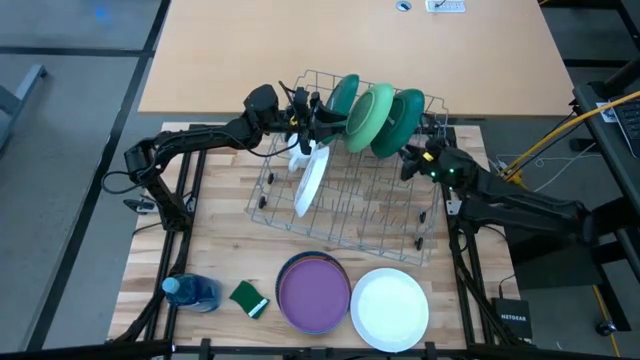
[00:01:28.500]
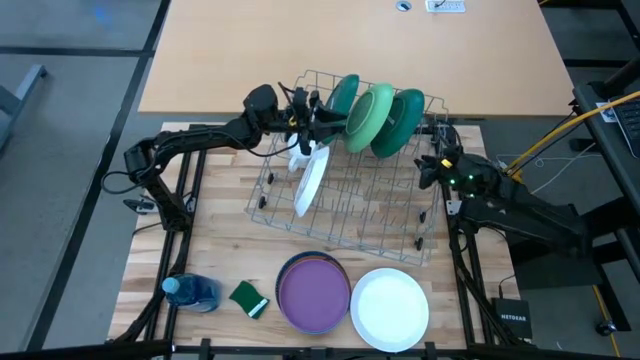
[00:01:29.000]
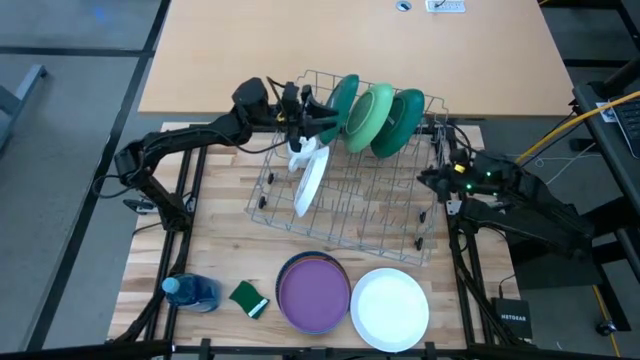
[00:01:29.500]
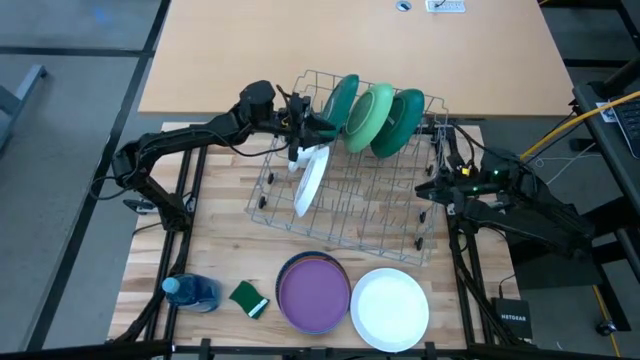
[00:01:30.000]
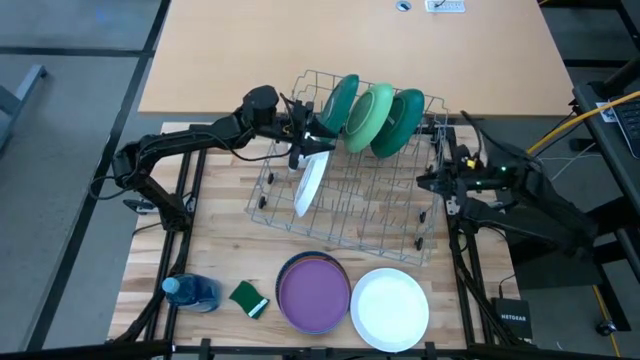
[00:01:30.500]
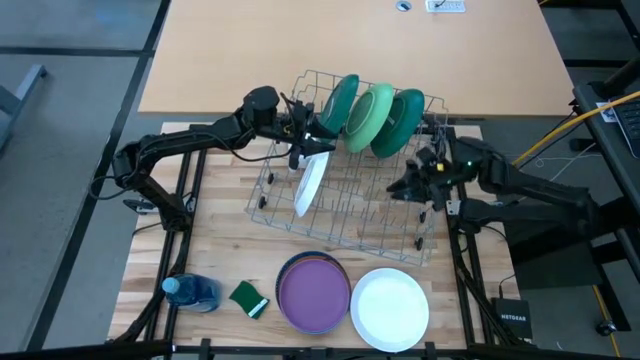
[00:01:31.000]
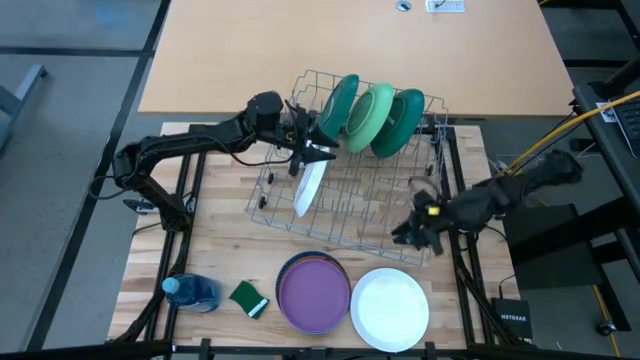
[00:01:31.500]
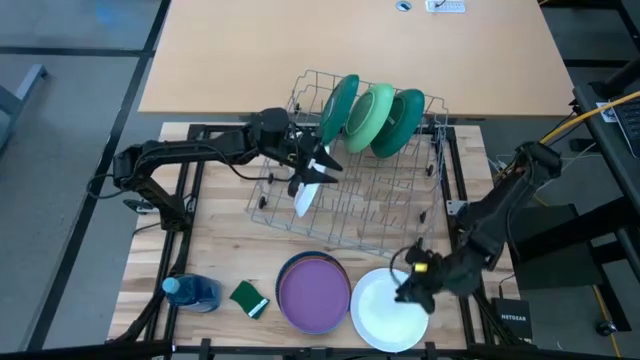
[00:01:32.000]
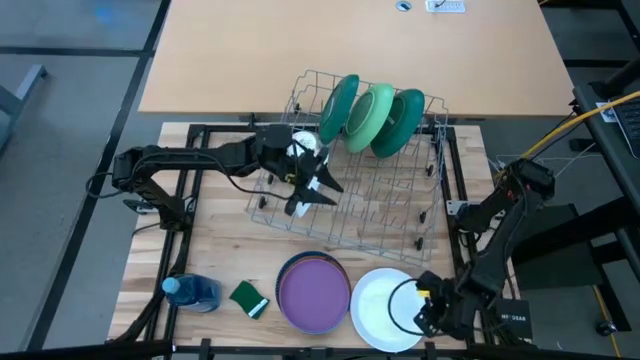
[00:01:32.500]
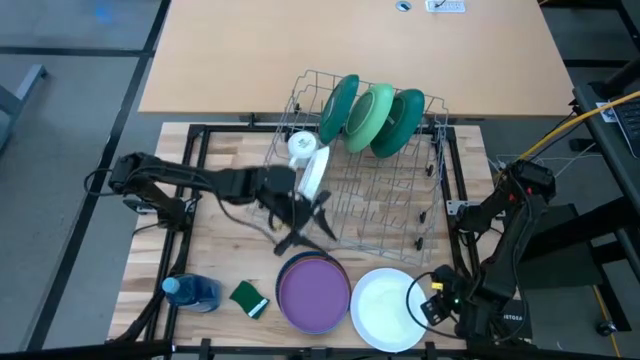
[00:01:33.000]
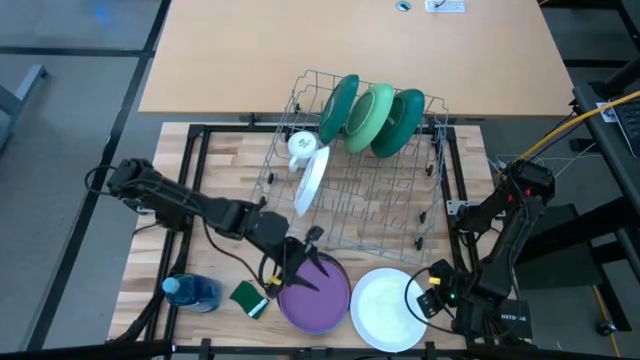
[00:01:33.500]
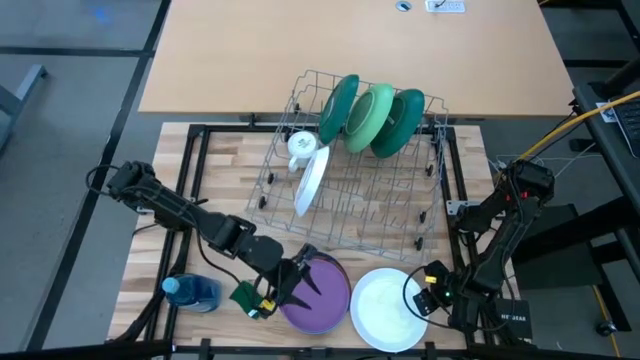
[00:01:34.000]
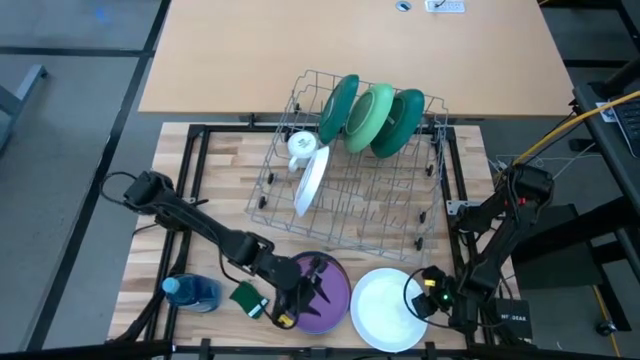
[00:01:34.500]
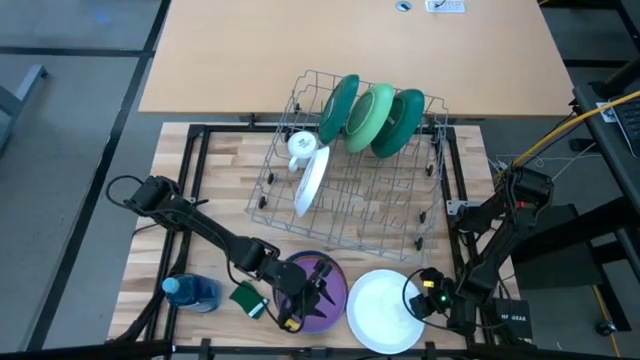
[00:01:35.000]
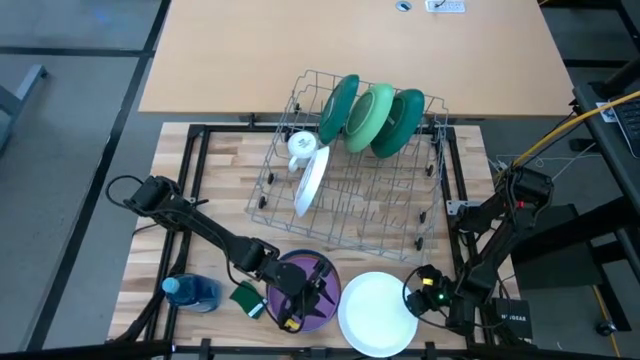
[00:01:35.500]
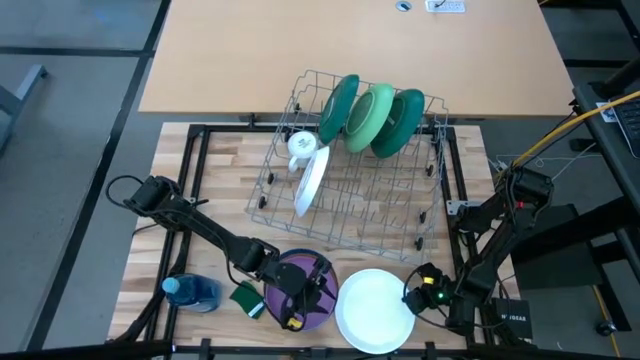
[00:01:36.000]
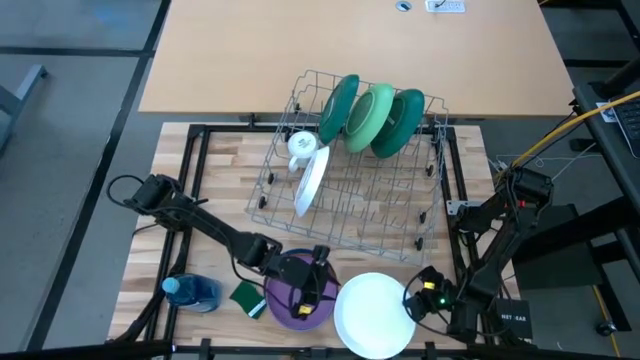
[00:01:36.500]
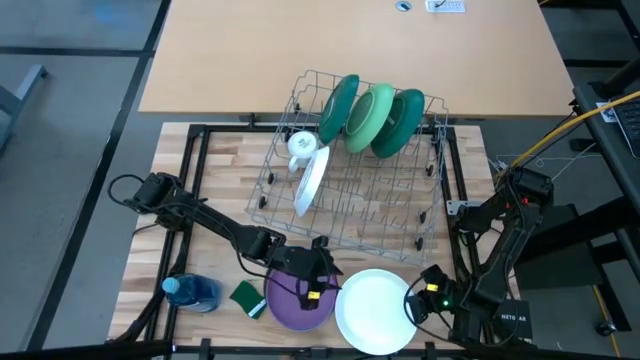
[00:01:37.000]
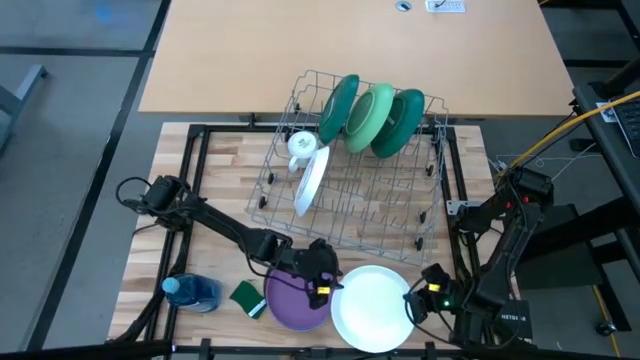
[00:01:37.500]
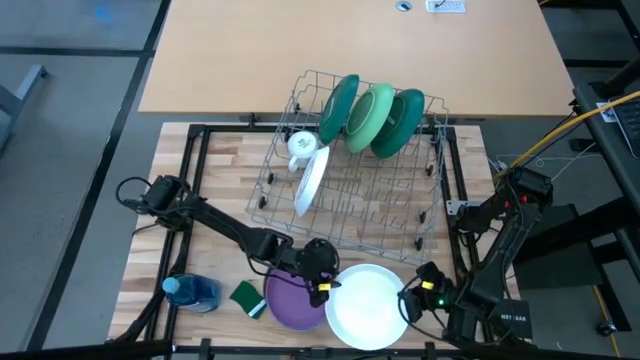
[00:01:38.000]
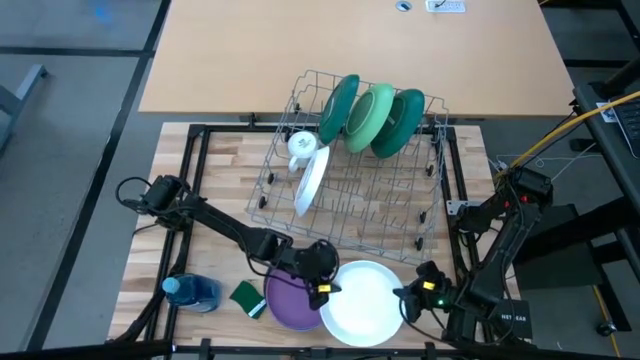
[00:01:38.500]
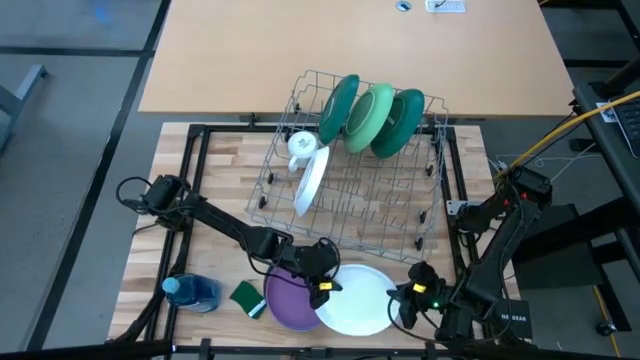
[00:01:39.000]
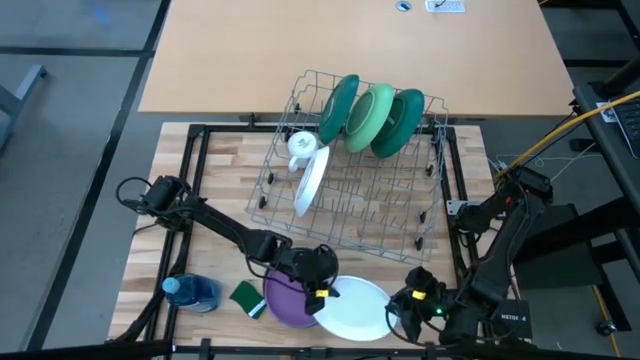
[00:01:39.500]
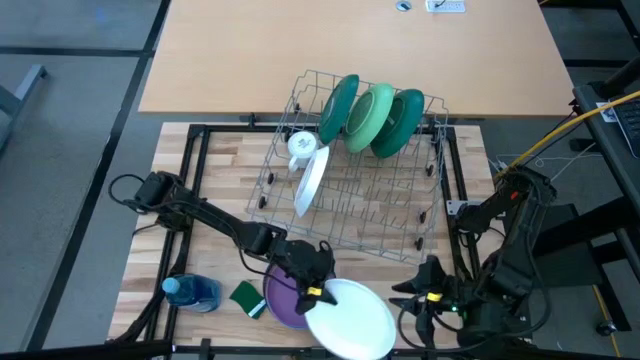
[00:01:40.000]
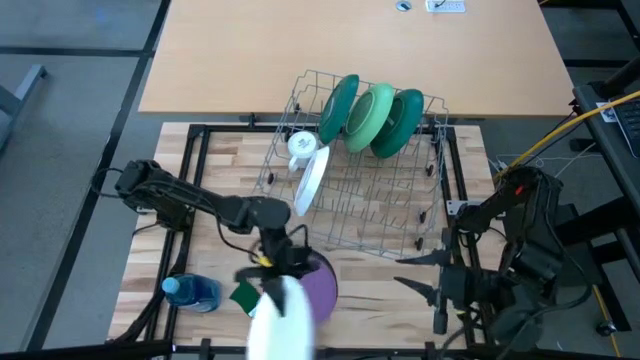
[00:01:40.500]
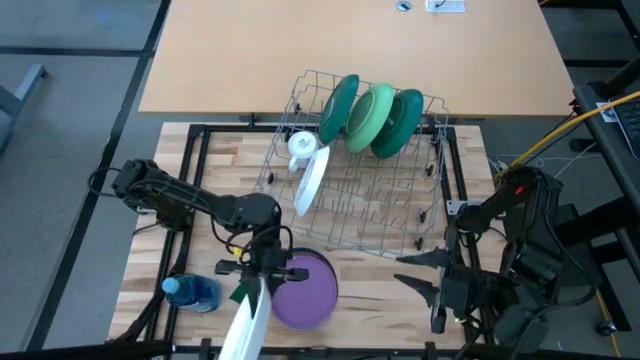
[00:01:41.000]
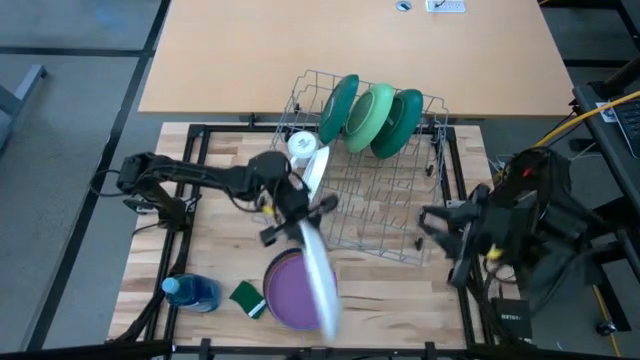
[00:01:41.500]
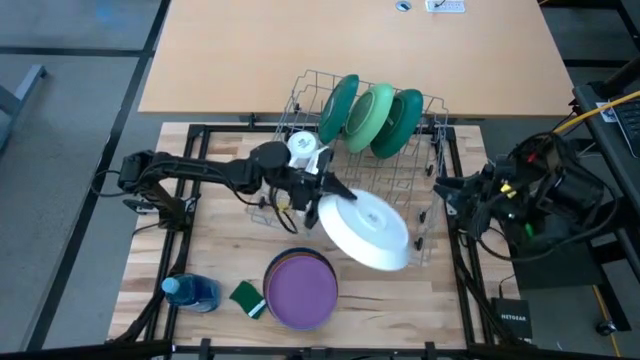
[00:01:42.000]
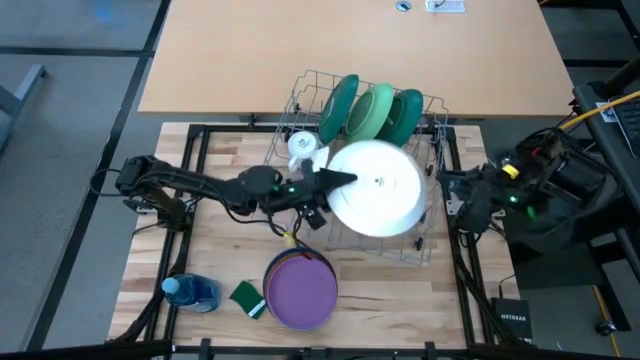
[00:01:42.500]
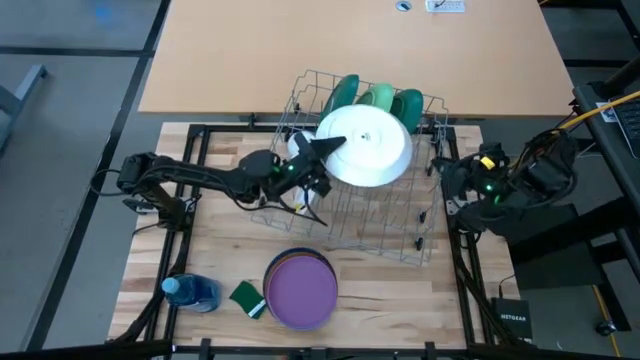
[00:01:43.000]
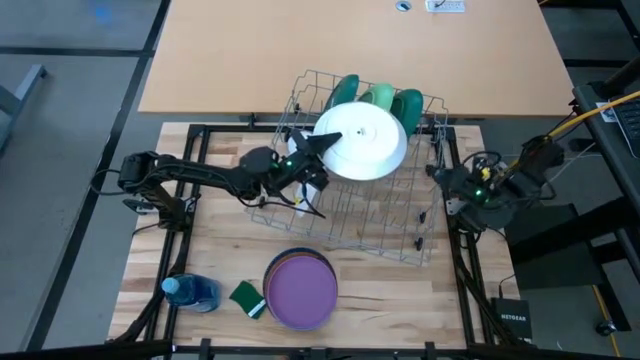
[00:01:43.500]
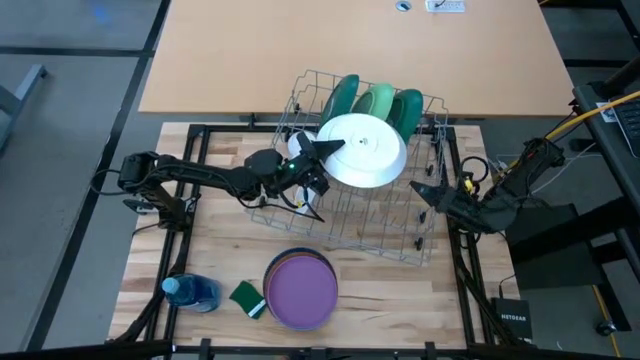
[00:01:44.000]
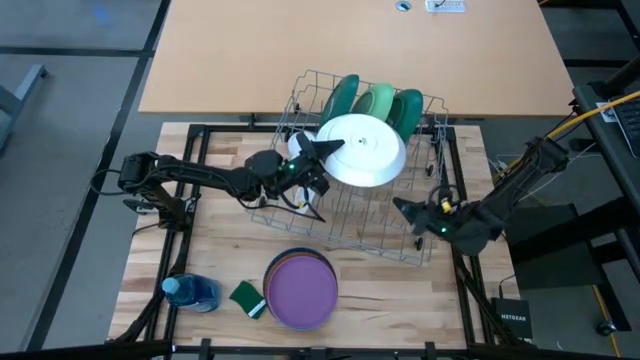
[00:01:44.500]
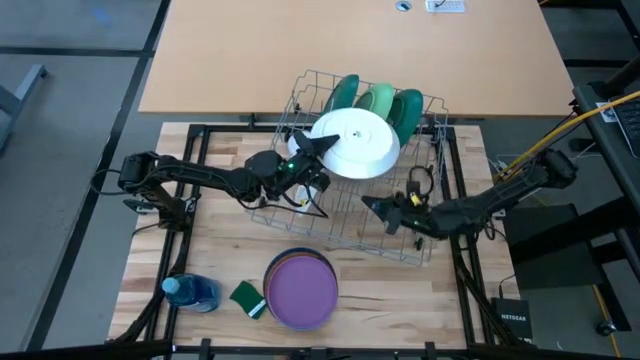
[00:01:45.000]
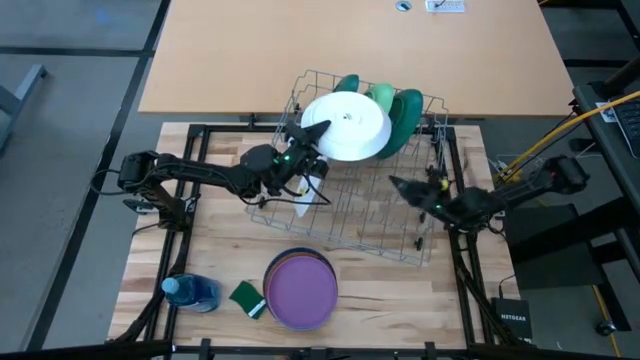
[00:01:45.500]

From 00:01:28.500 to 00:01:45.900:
Task: Sort dishes
Put the white plate in the dish rack
